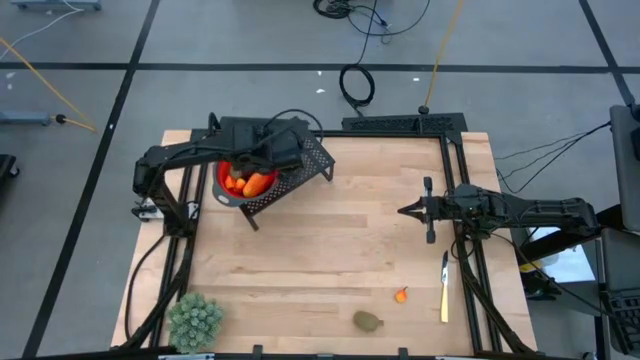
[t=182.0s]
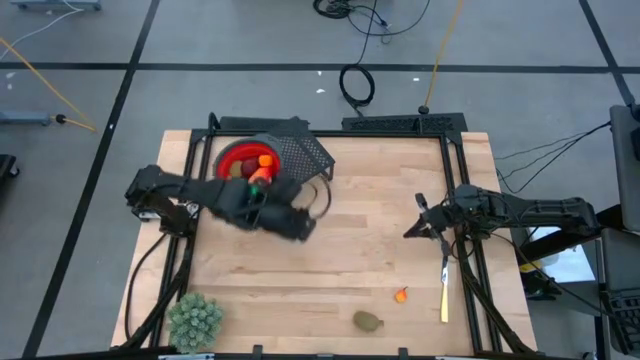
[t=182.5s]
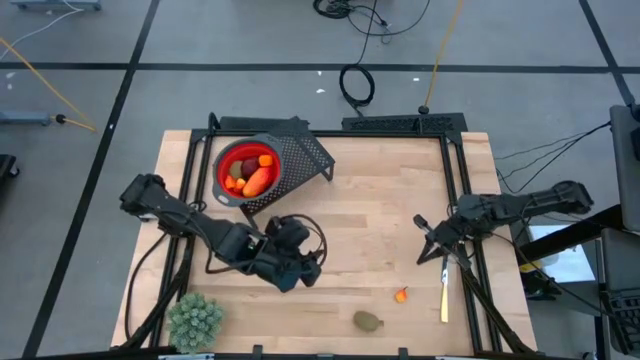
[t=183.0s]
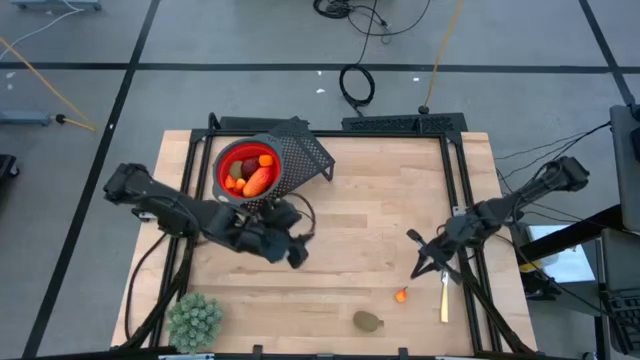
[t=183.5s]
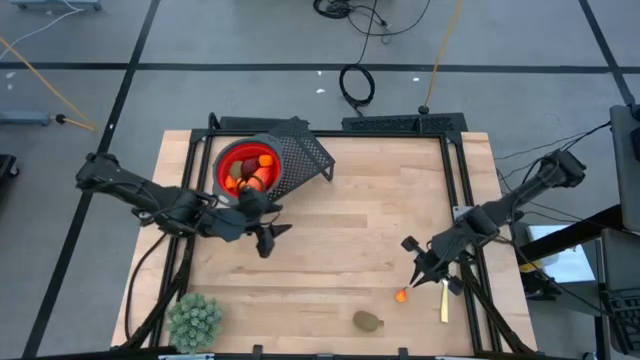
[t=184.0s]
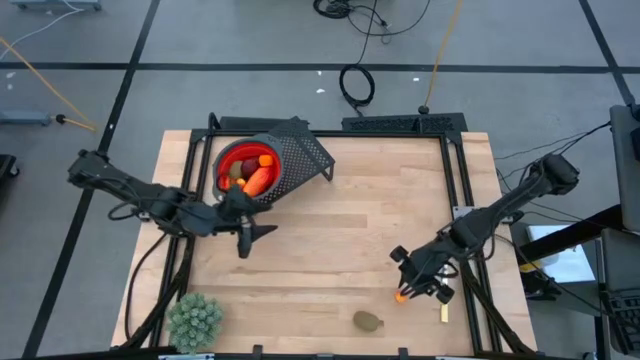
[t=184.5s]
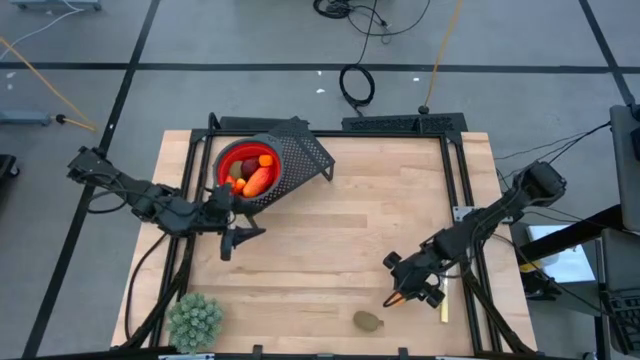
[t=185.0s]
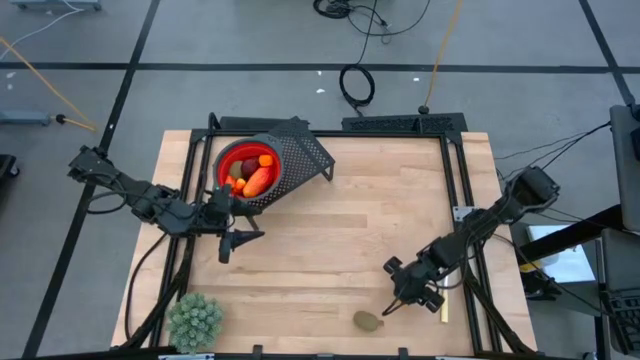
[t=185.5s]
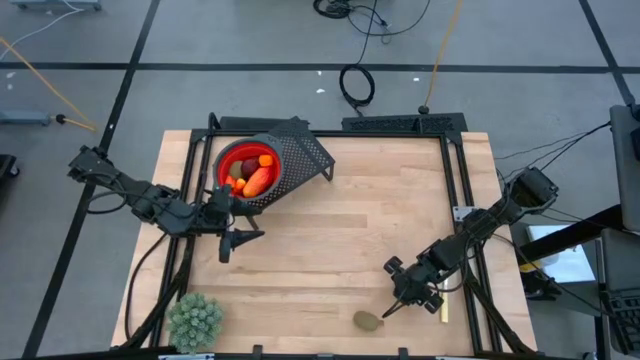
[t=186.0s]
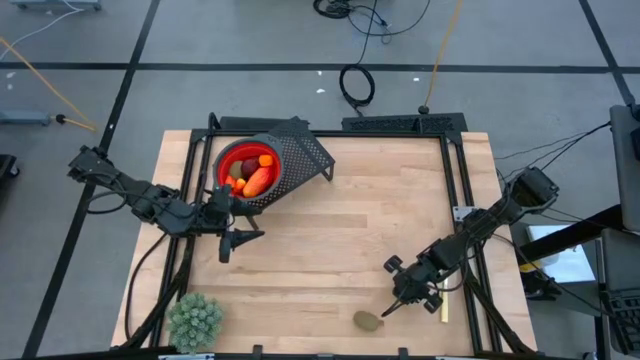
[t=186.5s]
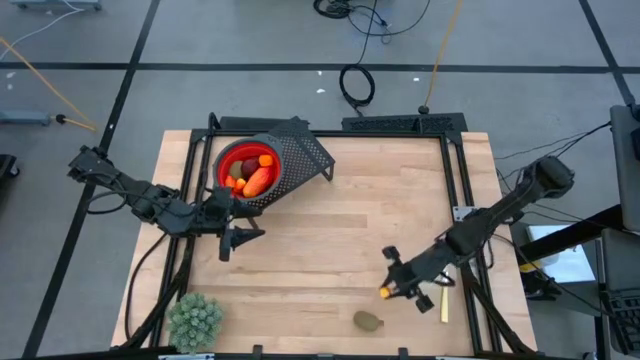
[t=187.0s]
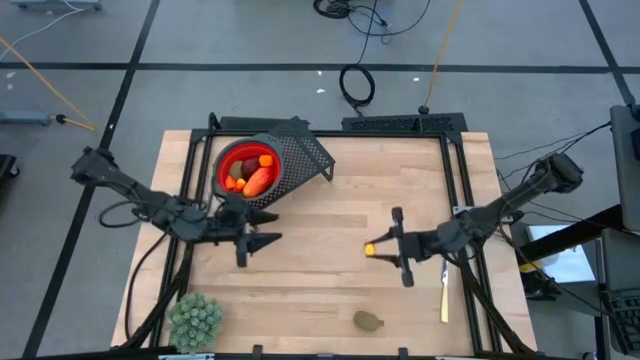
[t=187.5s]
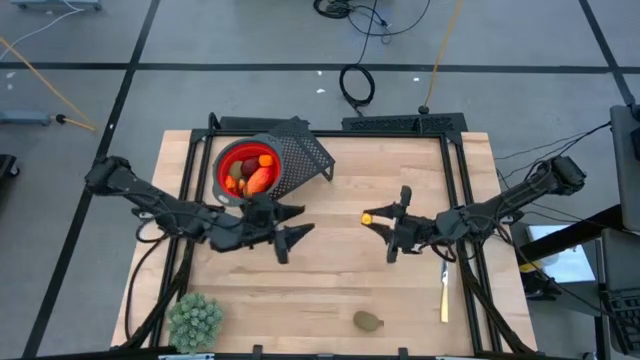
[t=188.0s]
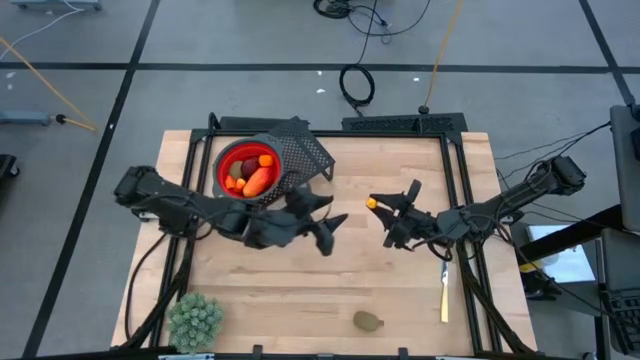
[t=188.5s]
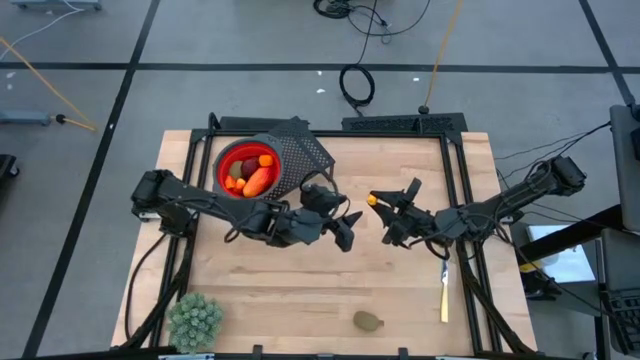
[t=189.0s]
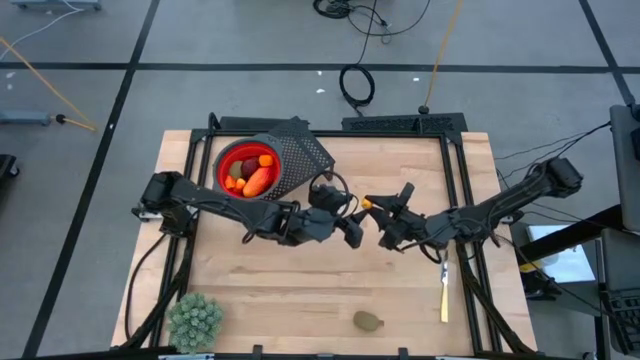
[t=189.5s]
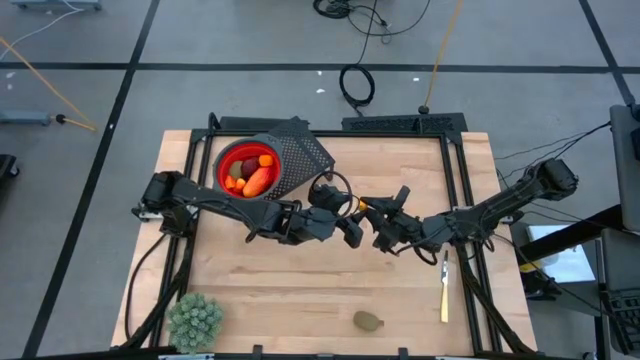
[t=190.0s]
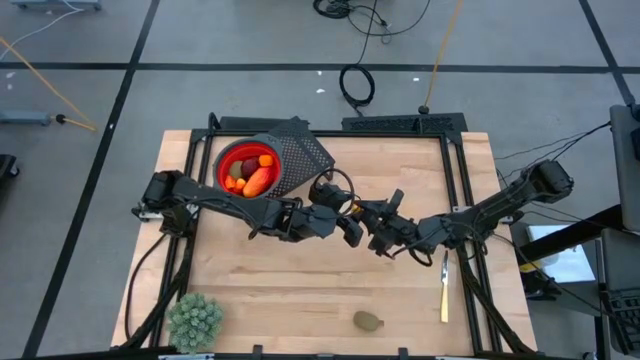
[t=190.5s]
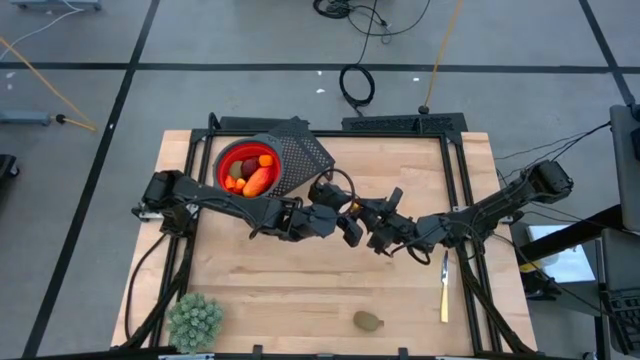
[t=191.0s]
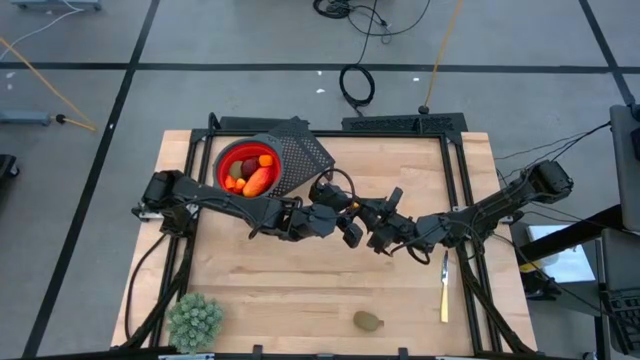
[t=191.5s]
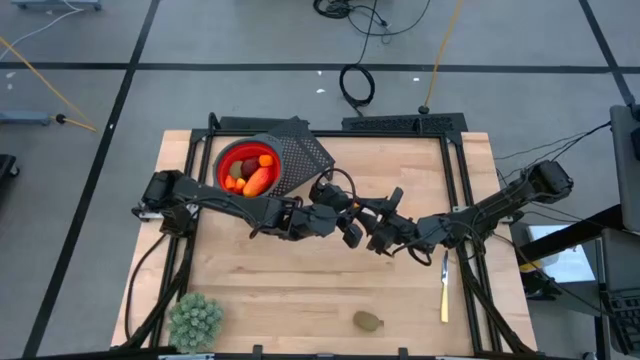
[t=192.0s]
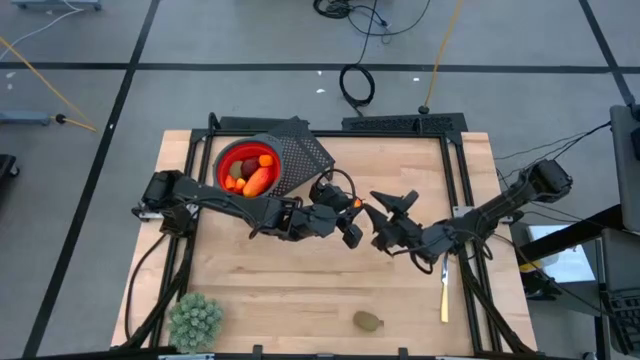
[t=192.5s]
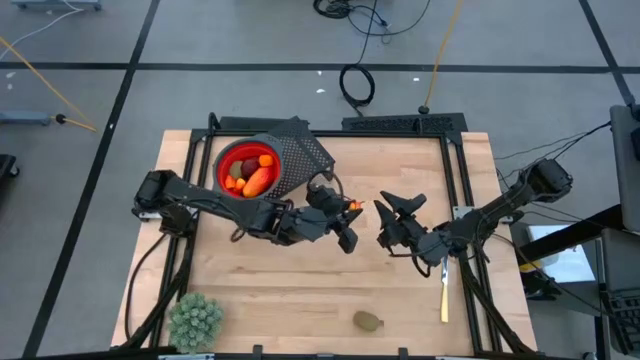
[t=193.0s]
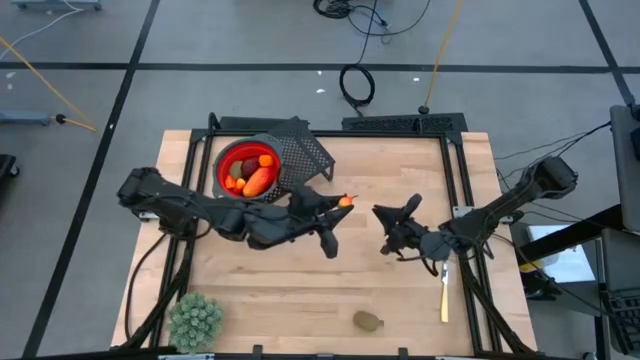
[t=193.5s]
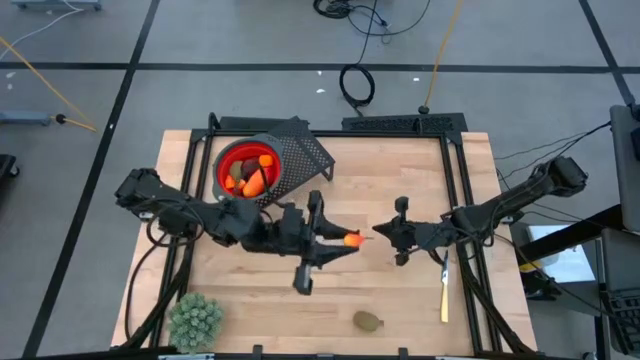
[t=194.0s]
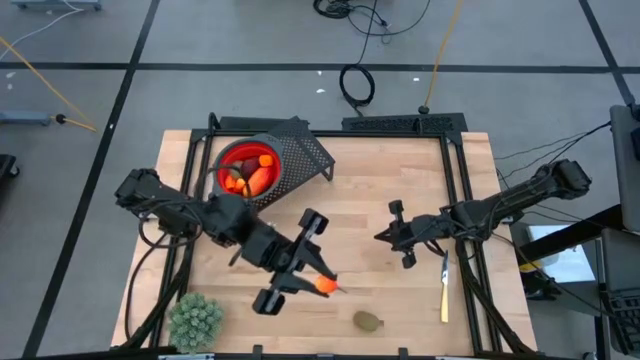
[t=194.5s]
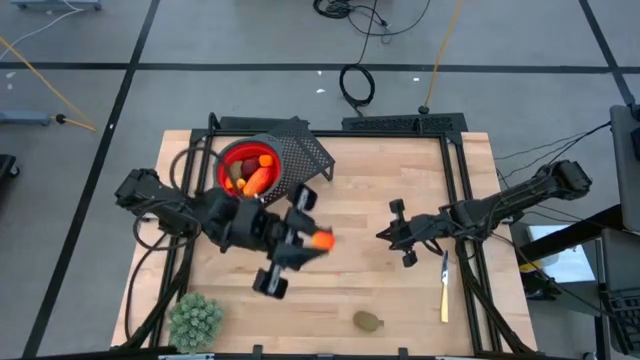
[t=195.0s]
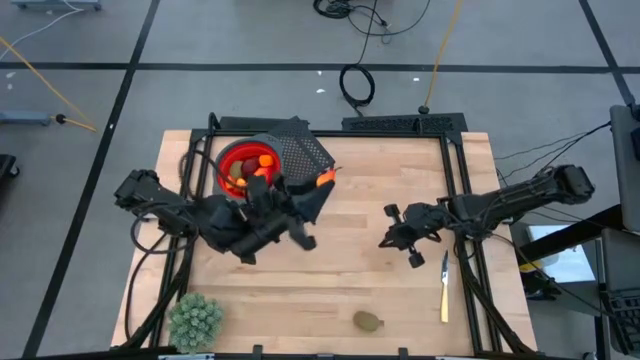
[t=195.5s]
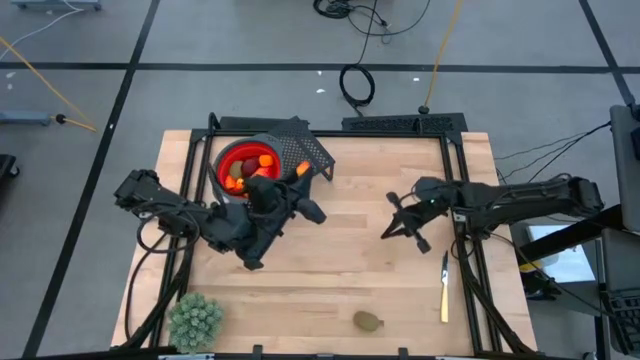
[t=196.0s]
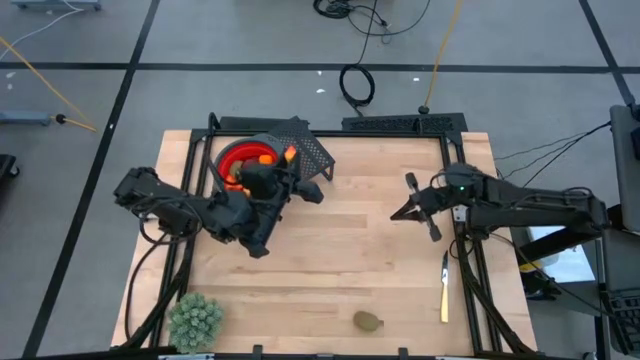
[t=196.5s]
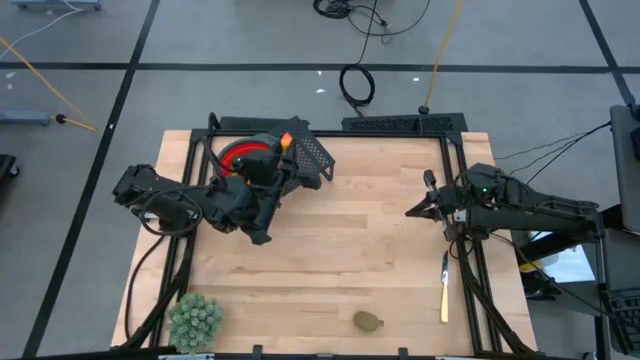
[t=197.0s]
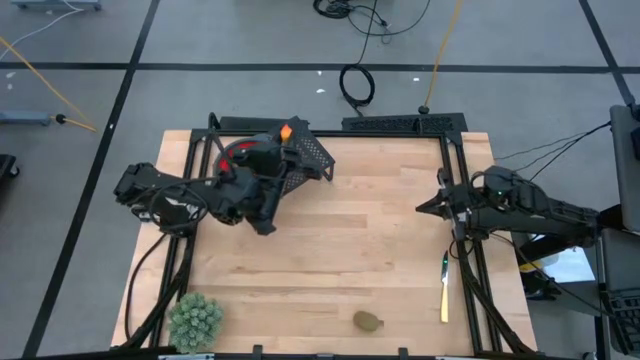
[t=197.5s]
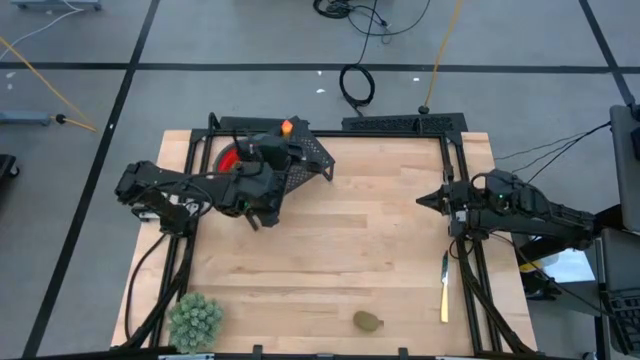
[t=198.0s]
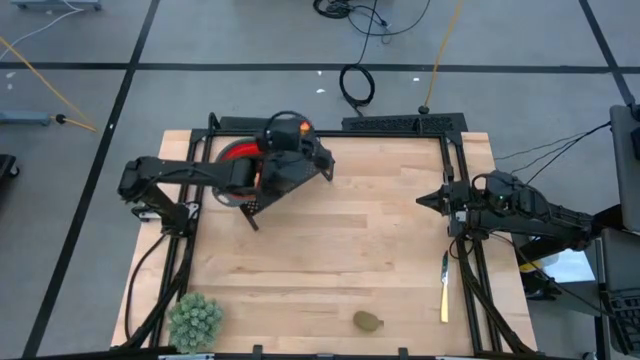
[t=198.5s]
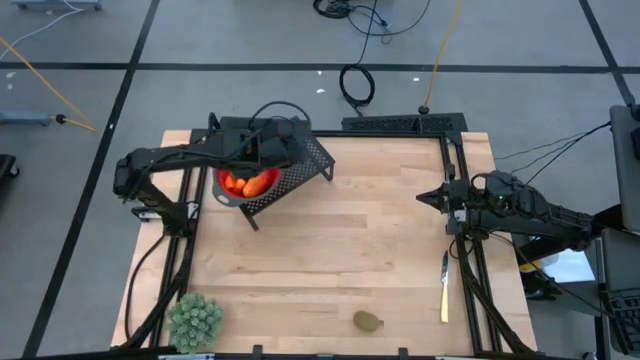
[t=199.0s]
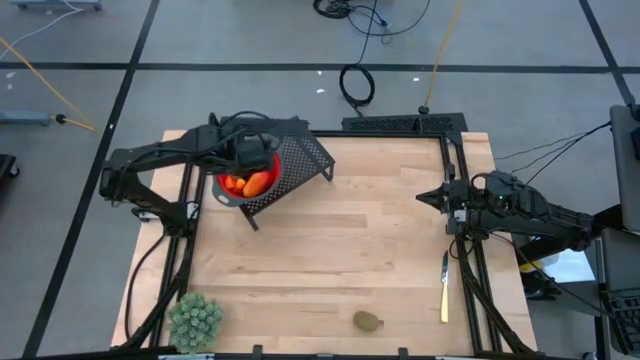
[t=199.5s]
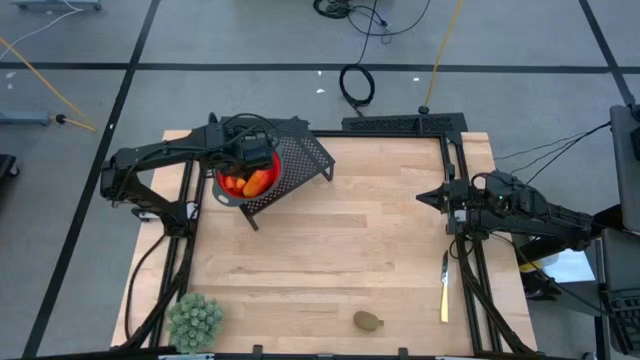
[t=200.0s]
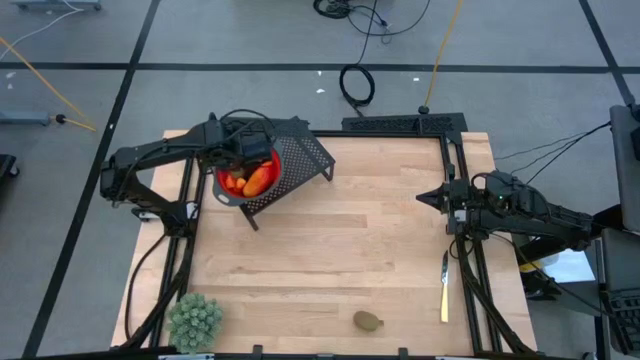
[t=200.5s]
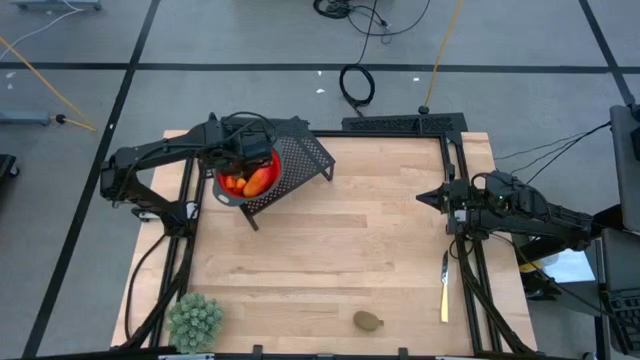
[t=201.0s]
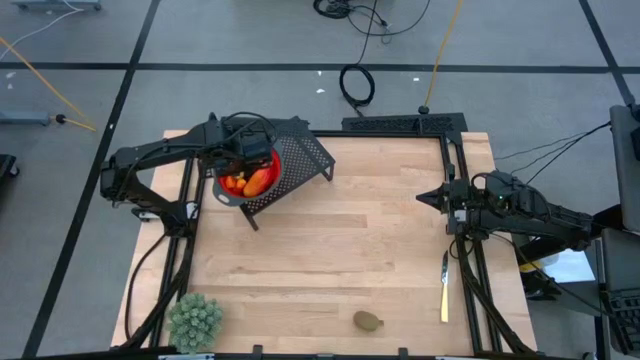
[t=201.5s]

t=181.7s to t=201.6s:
Task: Pick & Place Fruit
Put the peach into the red strainer bowl on the shelf

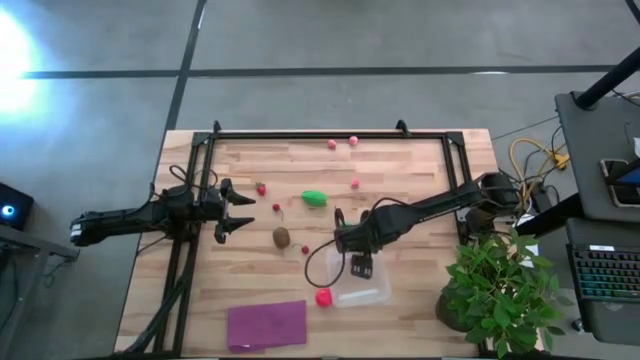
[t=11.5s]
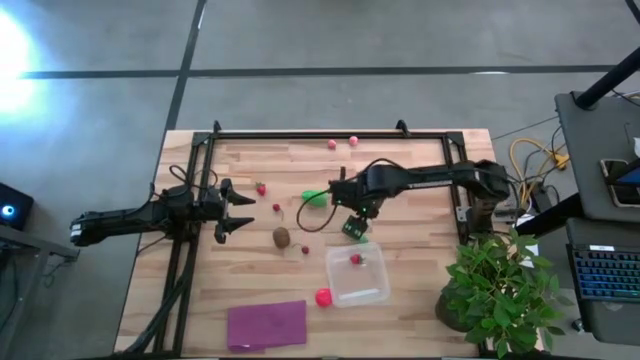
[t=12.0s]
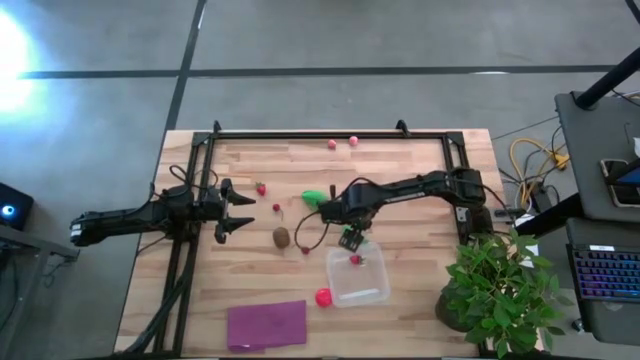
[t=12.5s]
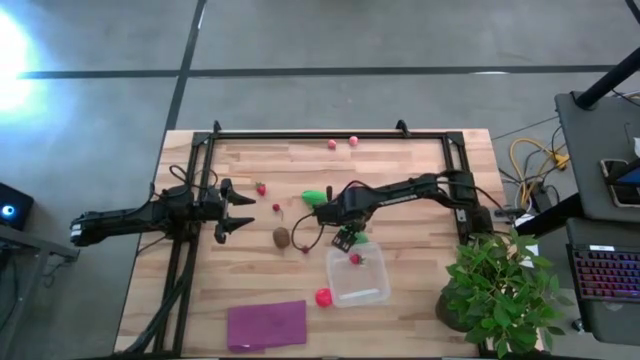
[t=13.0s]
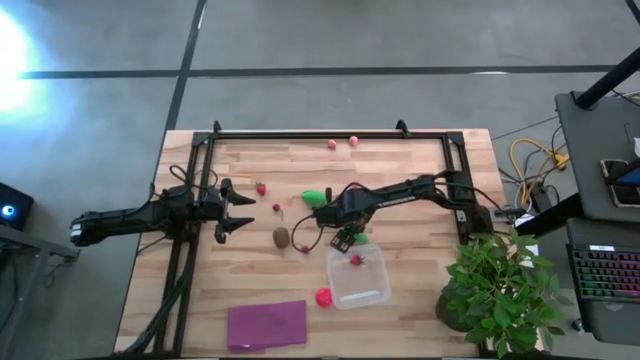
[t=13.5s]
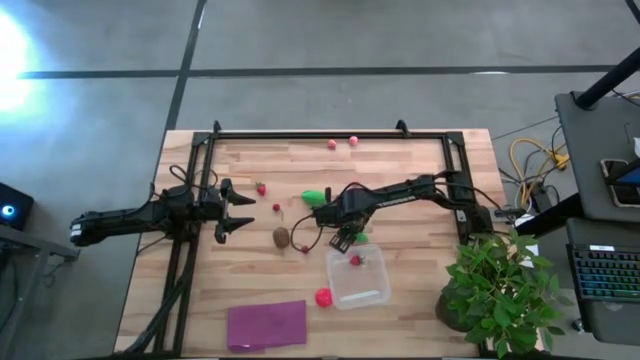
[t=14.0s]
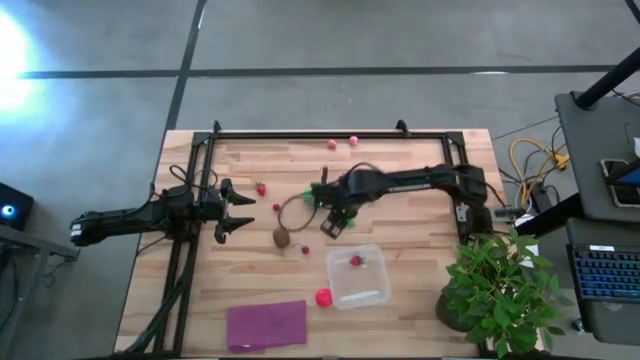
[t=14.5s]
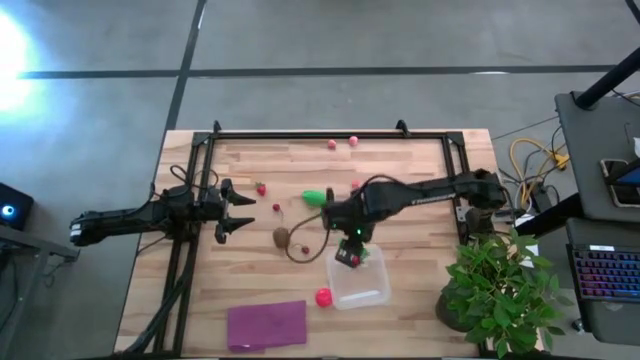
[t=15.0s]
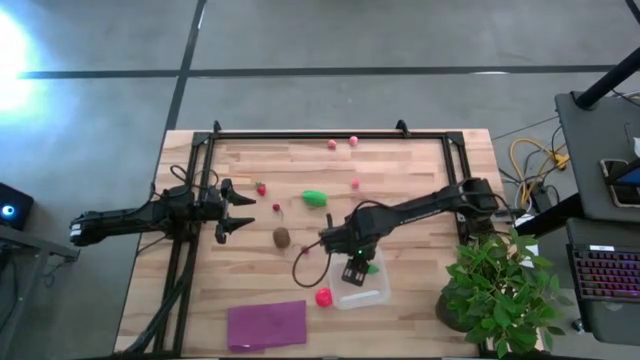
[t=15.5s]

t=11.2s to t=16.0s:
Task: Pick and placing Produce into tupperware
Put the green eggplant into the transparent container
